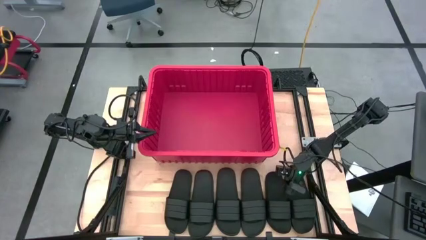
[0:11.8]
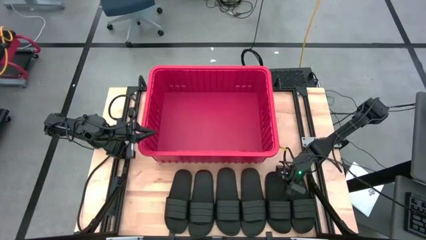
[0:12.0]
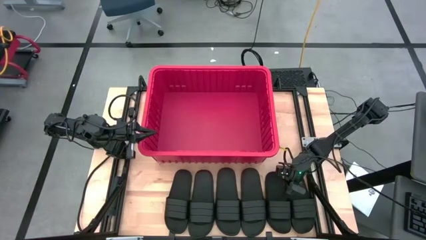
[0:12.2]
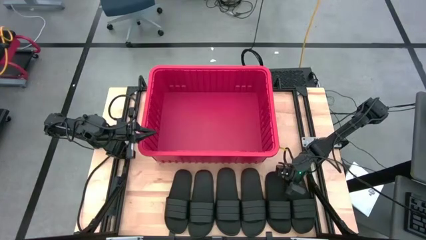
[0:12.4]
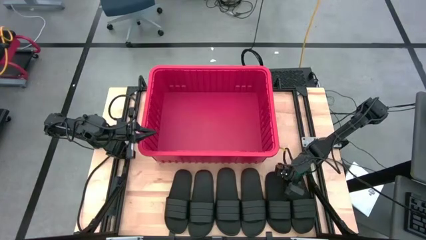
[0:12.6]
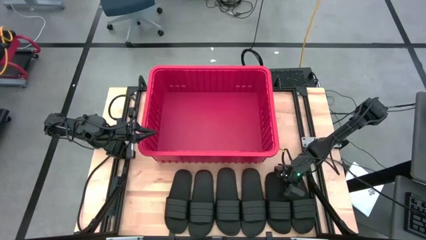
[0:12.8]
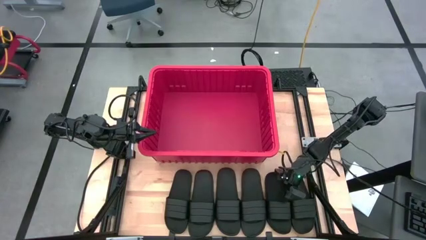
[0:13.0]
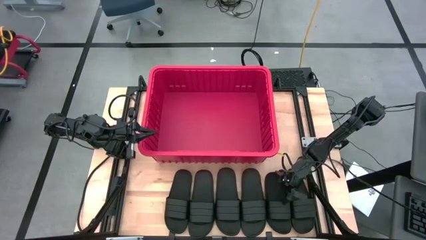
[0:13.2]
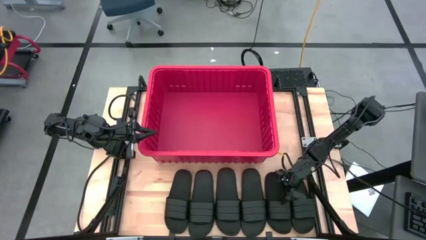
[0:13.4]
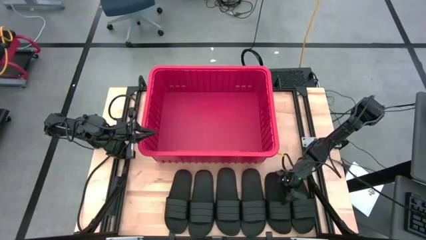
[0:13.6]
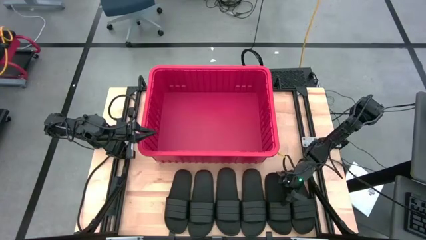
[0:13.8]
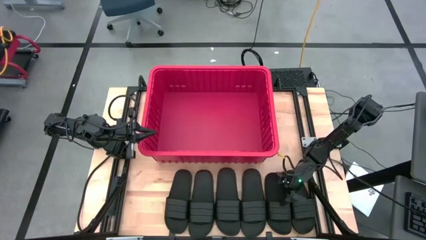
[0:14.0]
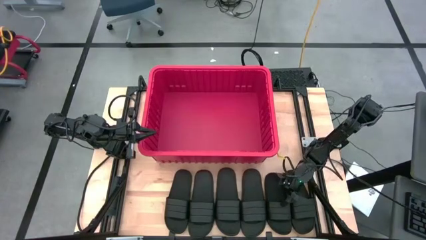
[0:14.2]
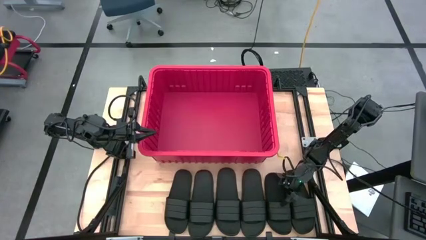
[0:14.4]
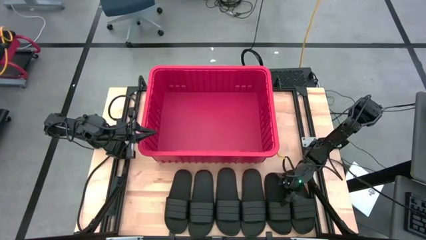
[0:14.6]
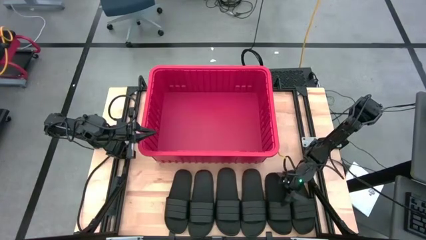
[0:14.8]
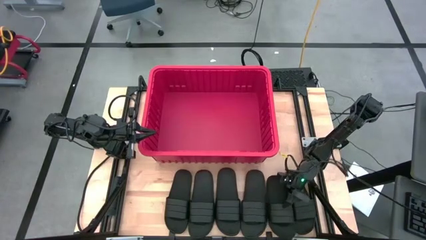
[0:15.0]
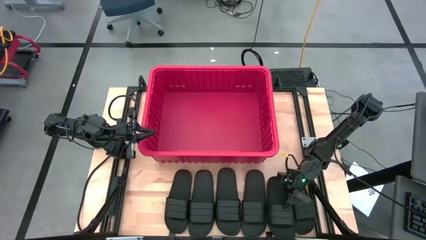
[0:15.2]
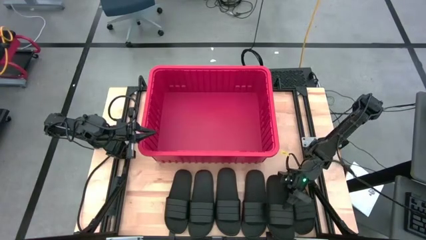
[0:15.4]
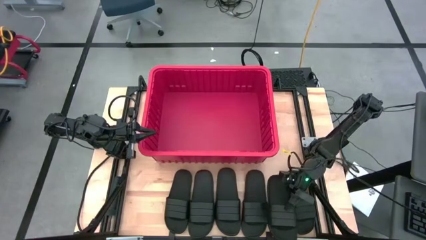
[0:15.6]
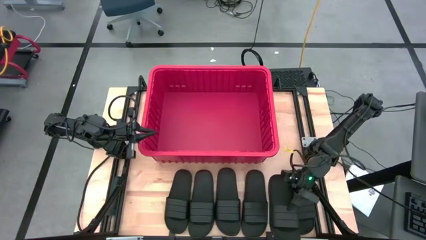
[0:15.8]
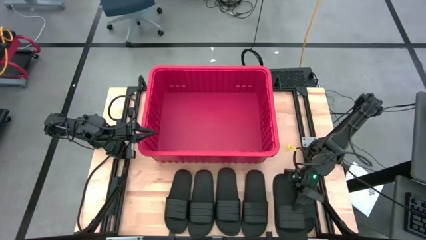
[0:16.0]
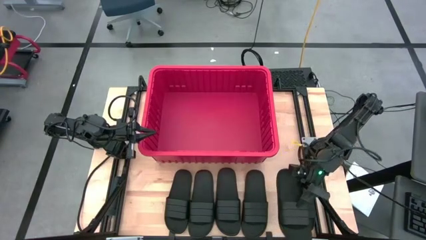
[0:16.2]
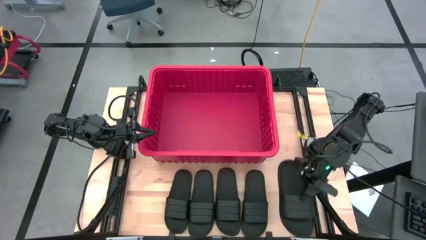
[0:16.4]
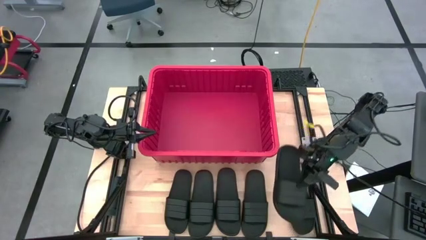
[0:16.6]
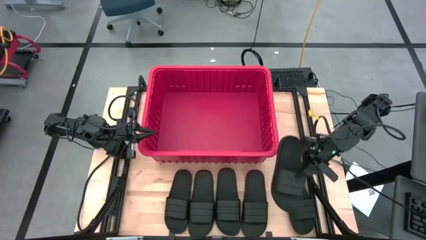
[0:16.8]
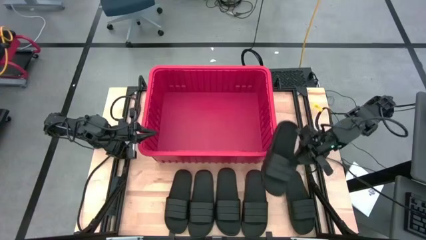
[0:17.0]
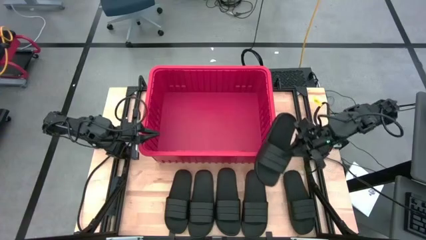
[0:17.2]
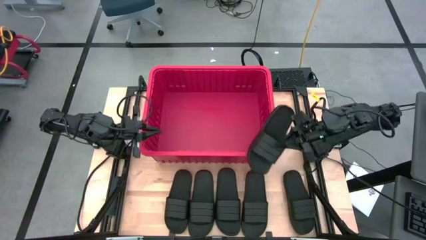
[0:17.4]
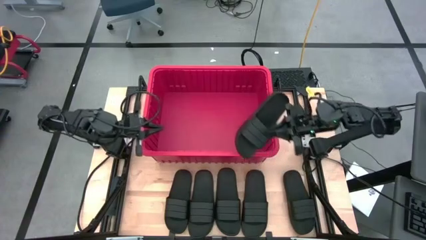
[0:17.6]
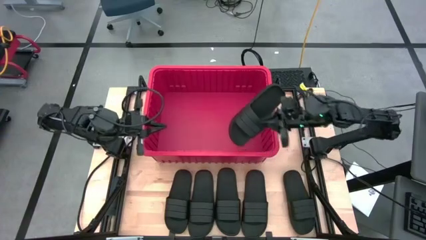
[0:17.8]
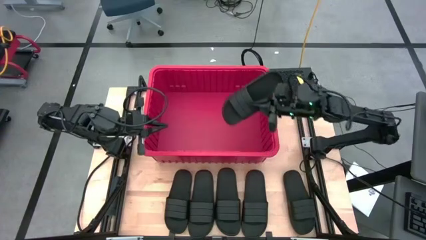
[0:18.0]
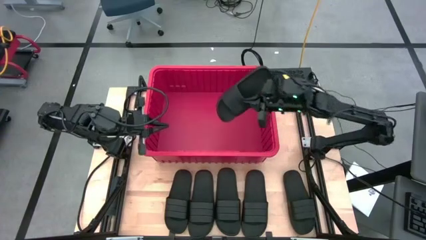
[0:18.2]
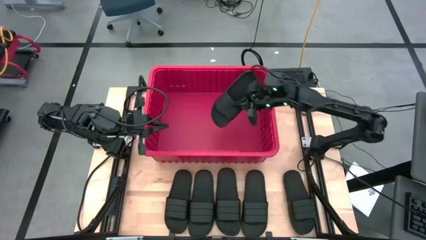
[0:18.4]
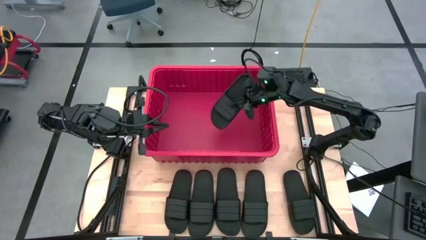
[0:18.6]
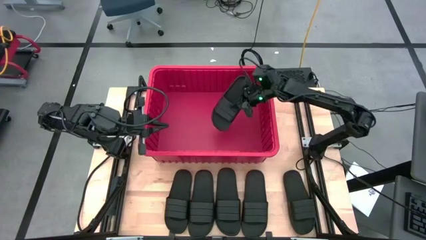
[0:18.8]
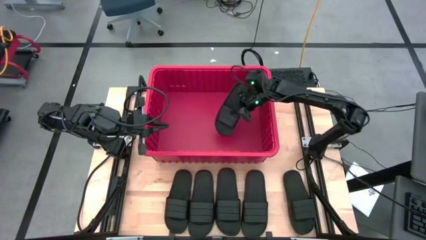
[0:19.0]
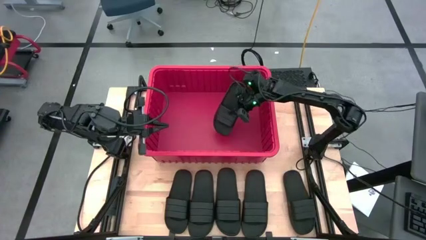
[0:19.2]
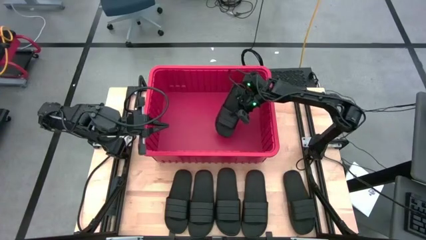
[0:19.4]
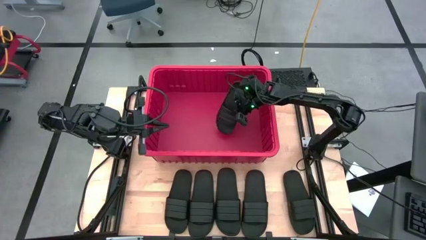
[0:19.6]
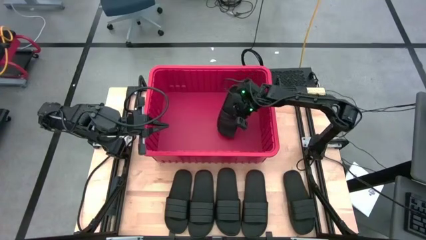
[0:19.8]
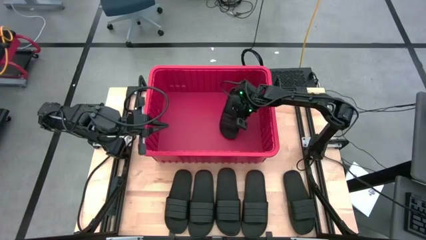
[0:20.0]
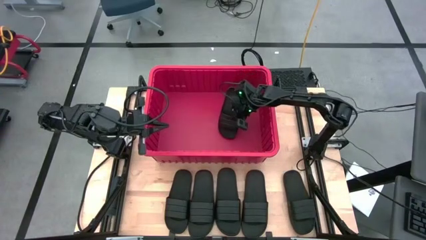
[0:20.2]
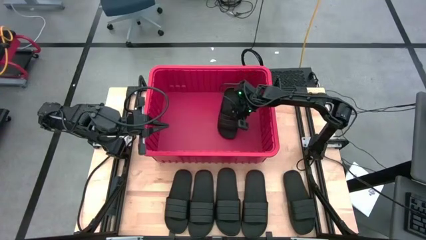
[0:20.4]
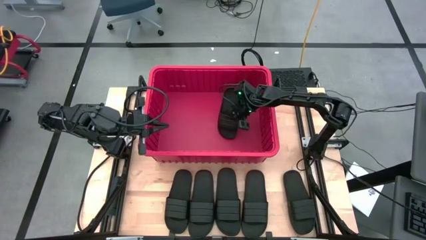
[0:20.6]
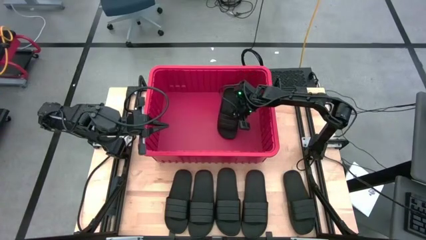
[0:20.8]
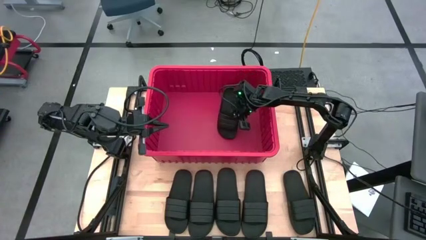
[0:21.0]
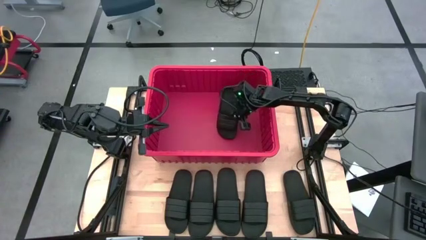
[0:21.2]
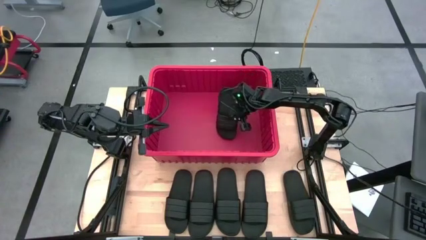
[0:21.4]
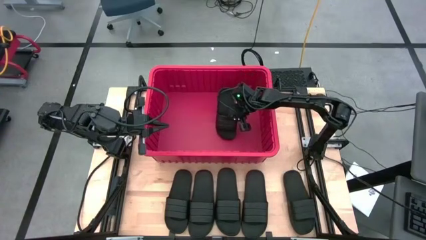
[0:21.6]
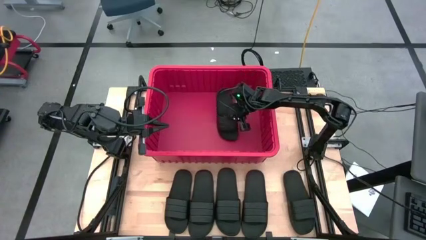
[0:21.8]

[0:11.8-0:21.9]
Task: Pick and place slides into bin
Put the black slide into the red bin
